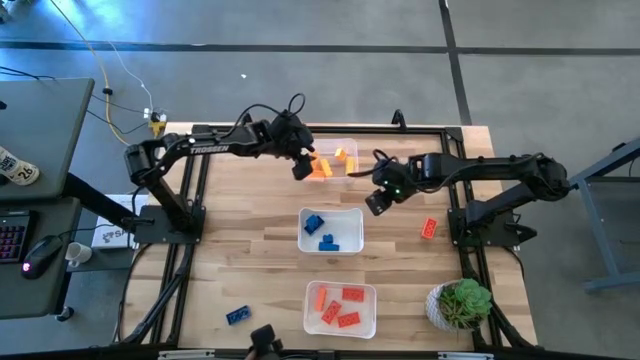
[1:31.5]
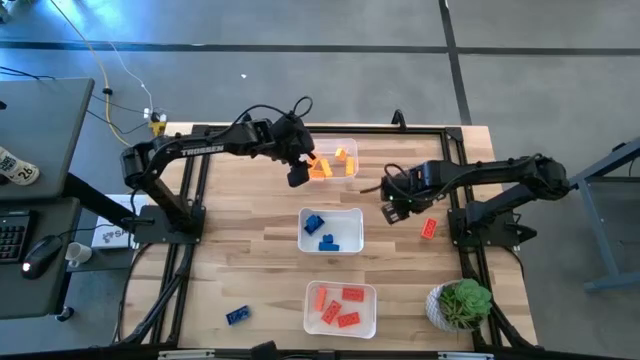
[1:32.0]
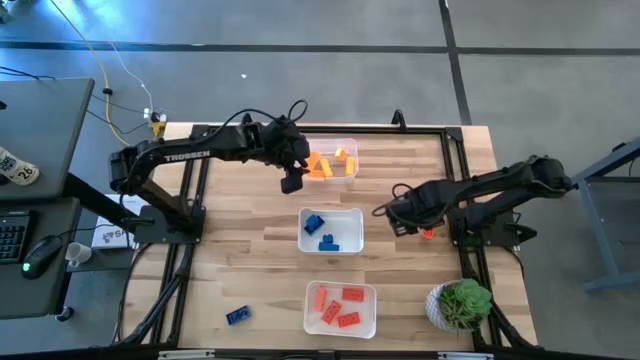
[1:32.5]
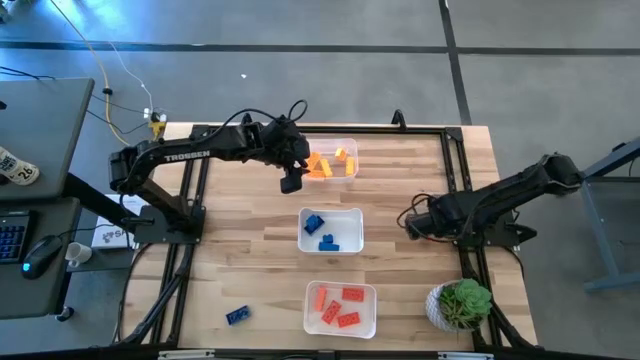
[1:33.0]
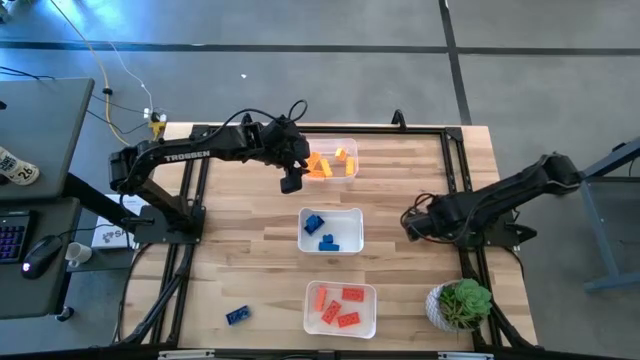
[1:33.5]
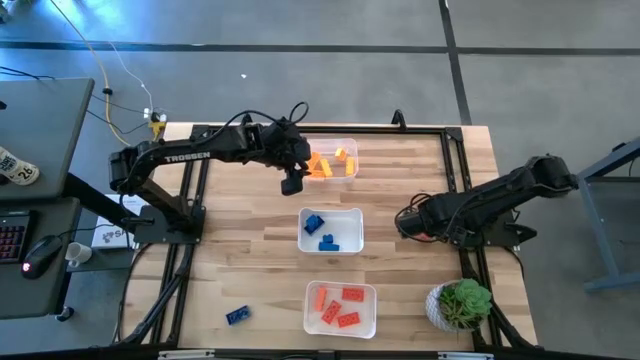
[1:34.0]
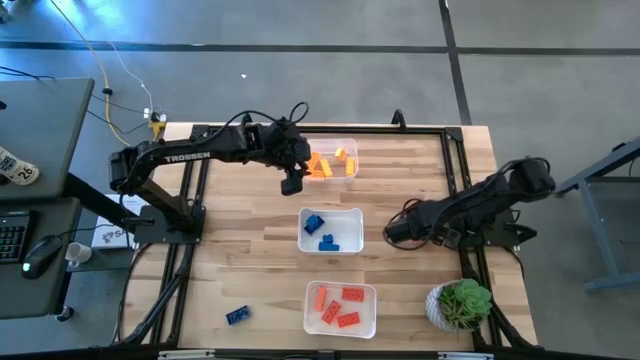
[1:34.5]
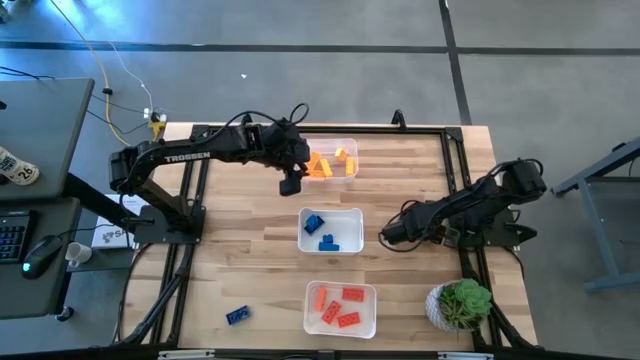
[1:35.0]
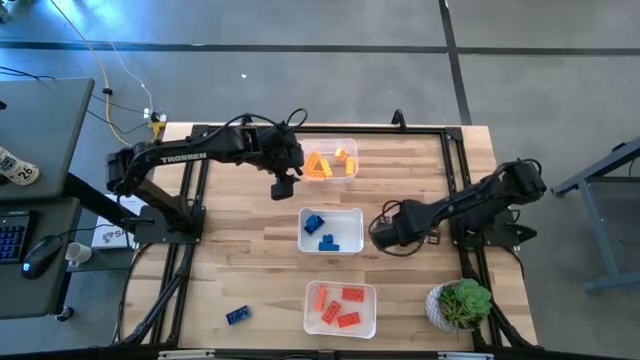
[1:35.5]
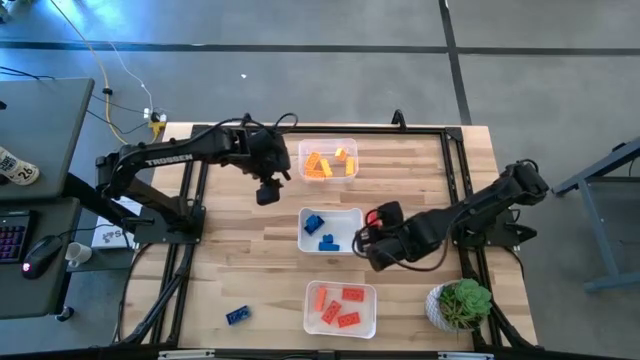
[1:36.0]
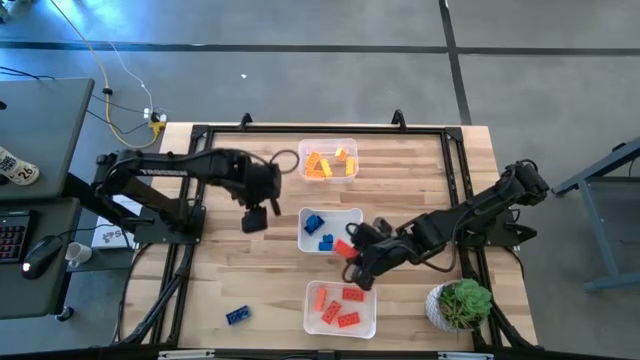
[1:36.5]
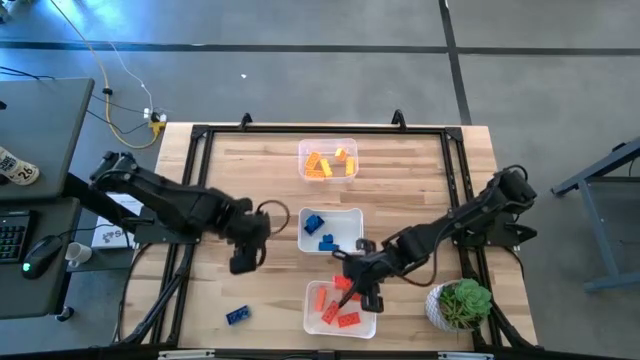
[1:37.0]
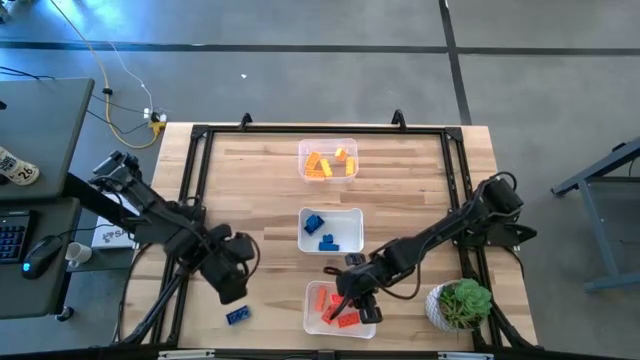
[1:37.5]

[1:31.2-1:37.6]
Task: Sort & place blocks by color
Put the orange game piece into the bottom white bin

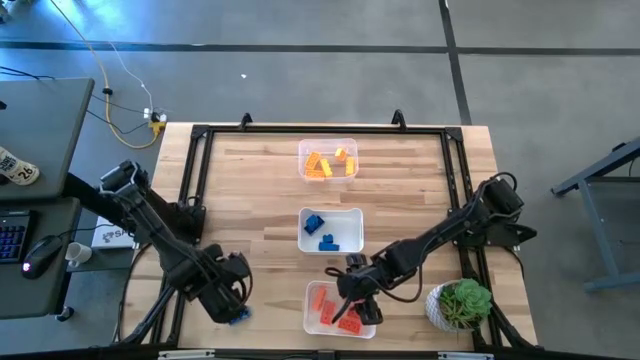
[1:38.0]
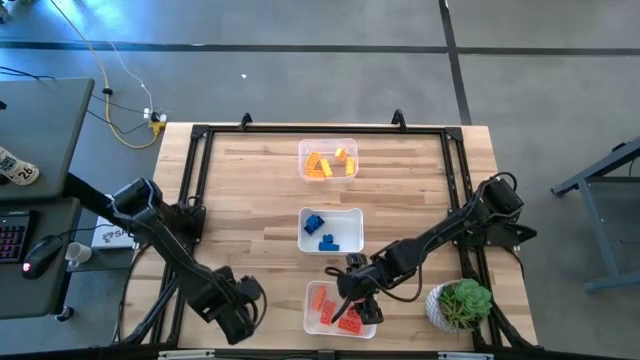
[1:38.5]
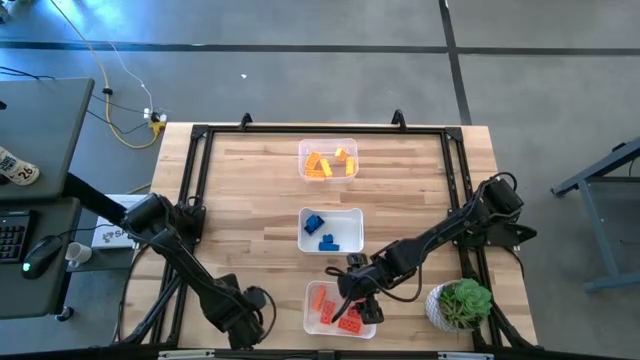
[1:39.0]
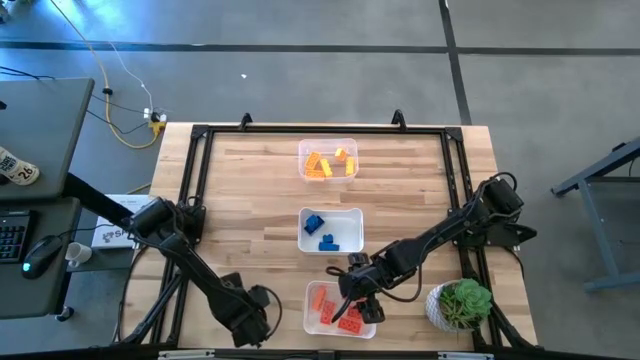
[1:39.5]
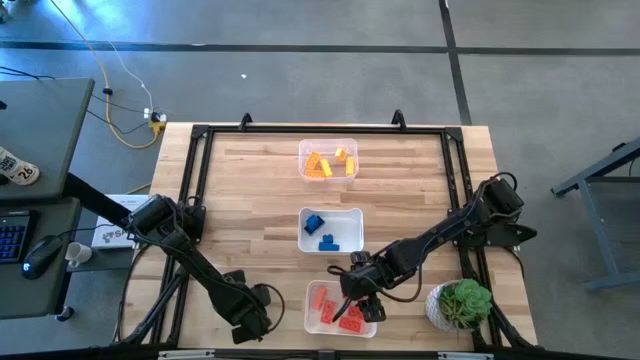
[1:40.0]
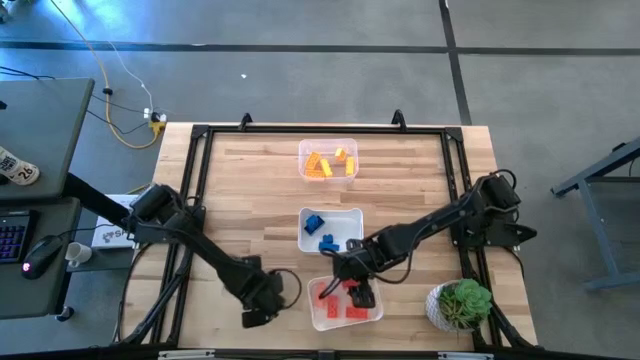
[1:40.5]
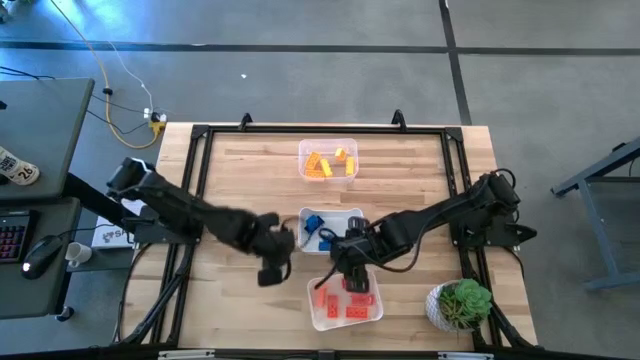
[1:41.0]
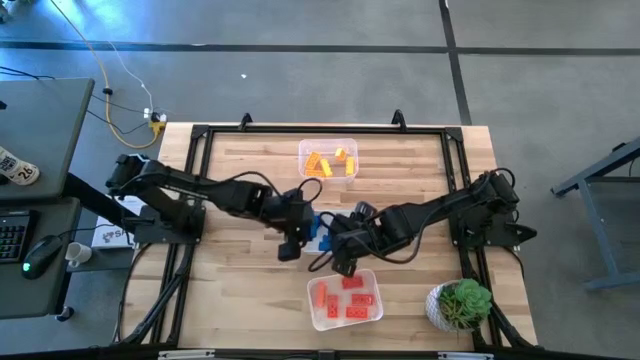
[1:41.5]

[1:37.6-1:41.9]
Put the blue game piece into the top white bin

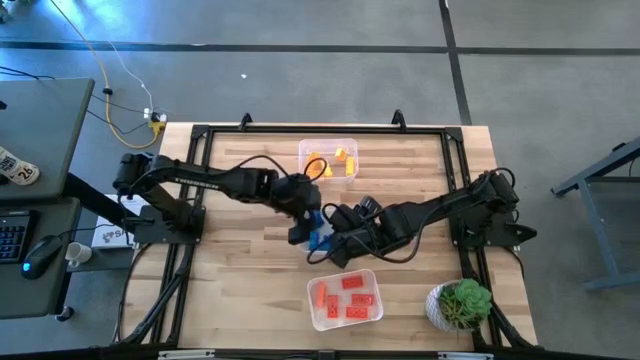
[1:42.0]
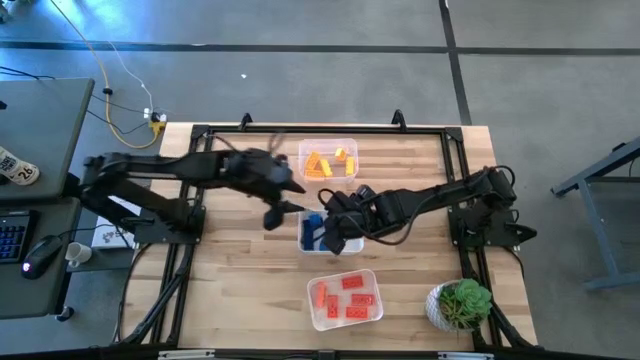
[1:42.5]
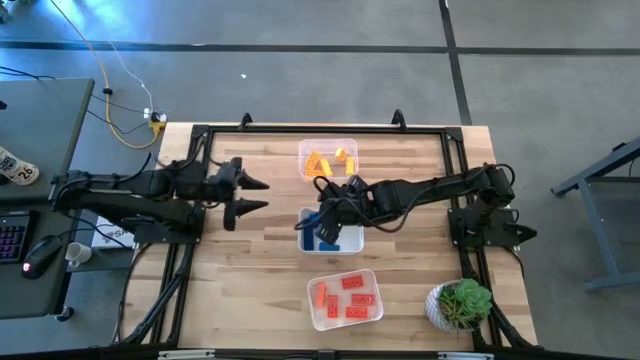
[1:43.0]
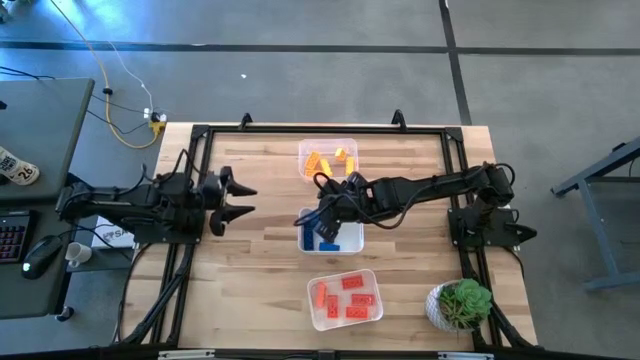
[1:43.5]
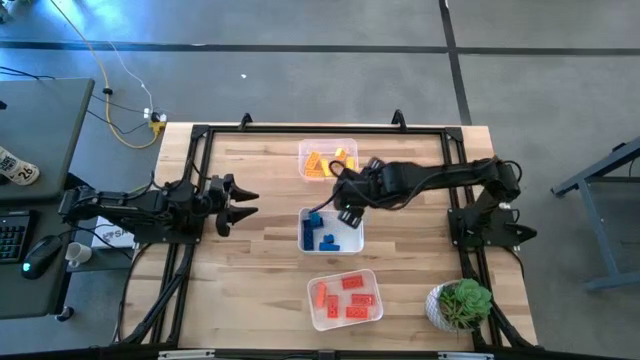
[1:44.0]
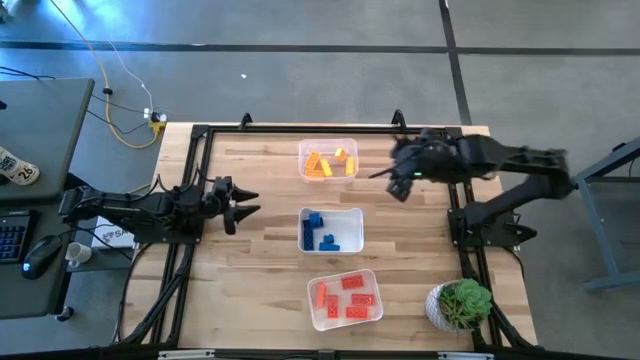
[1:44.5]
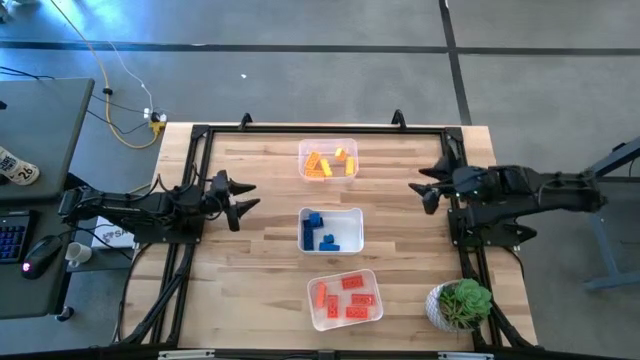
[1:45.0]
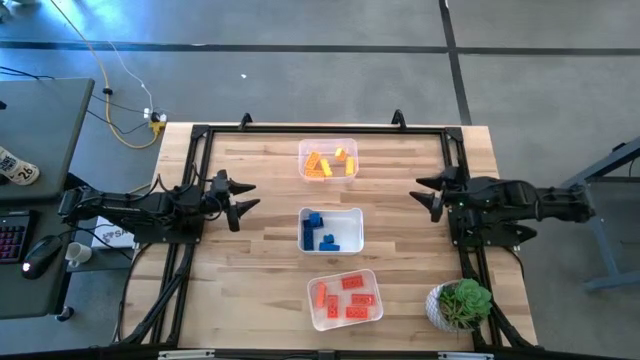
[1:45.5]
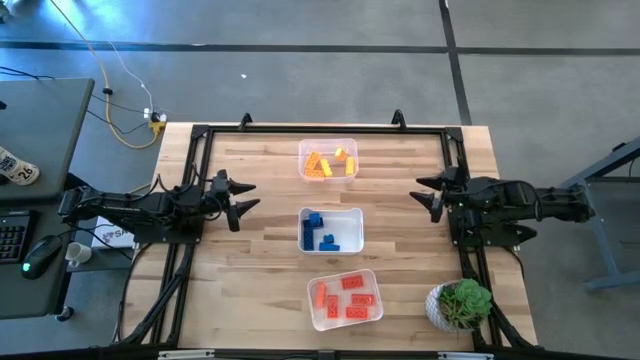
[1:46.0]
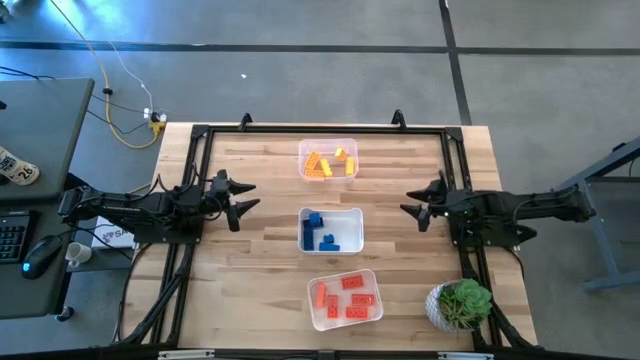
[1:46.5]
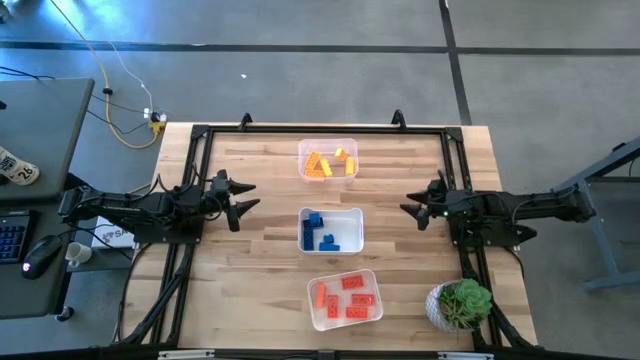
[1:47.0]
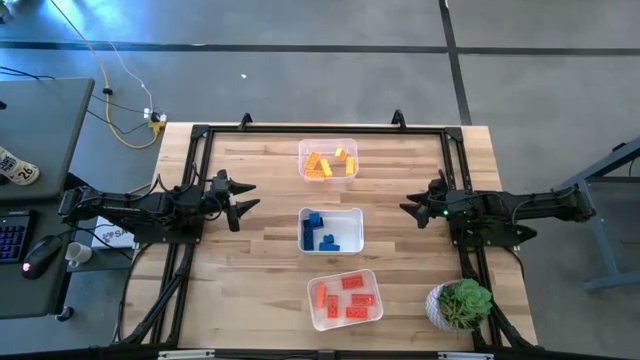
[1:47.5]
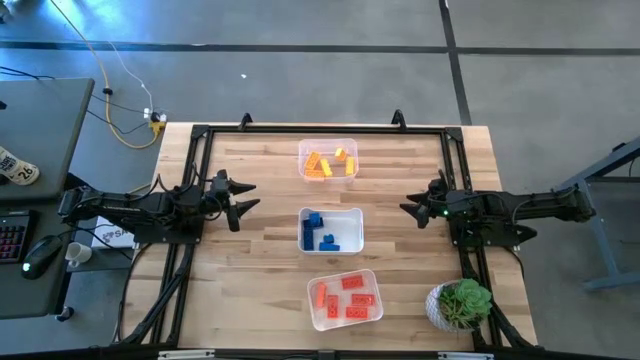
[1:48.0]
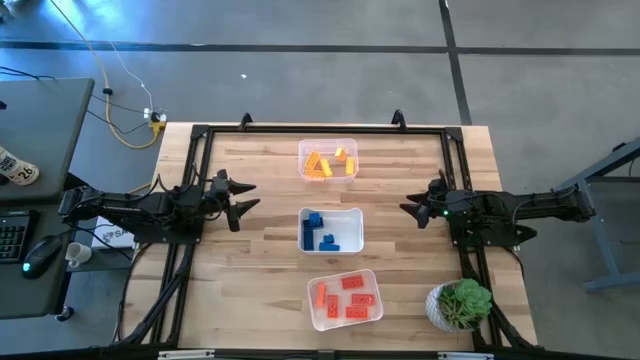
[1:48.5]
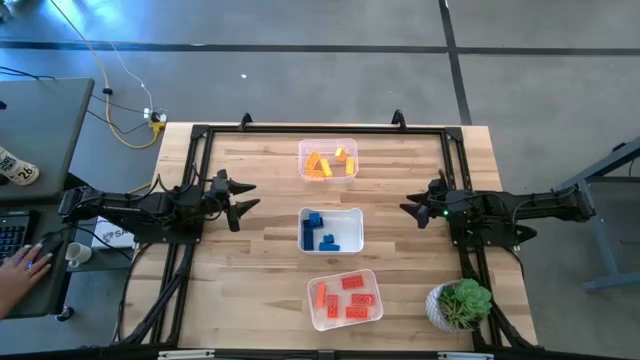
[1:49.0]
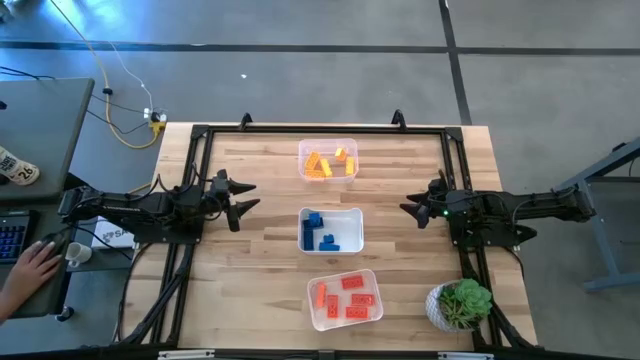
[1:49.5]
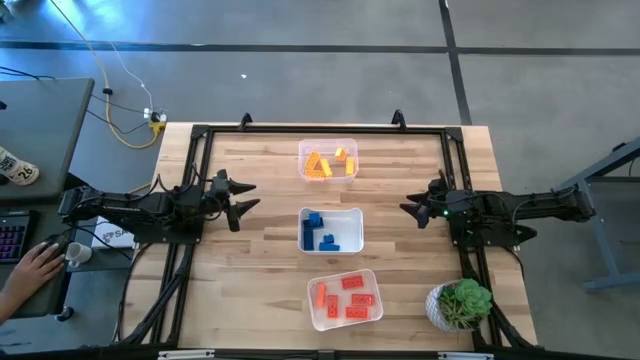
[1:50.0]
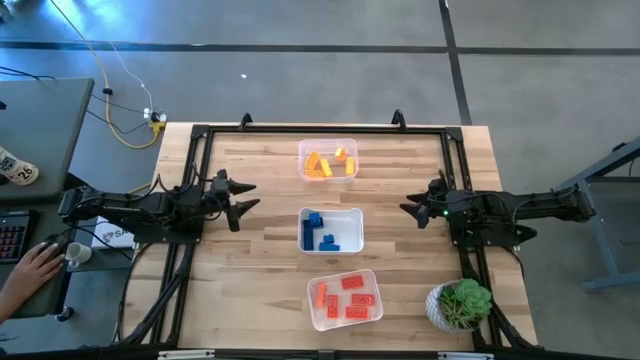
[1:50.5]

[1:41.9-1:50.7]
Return to Home Position

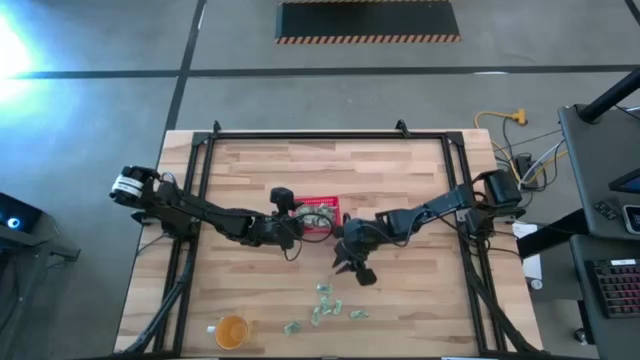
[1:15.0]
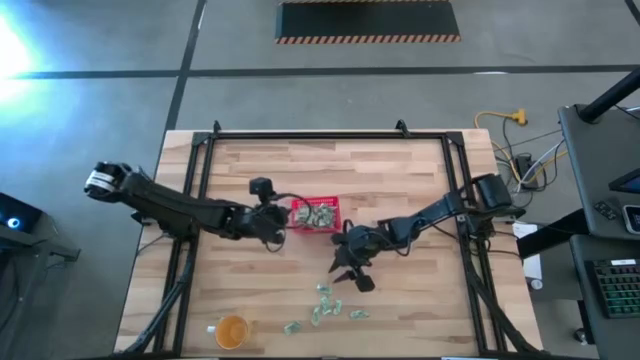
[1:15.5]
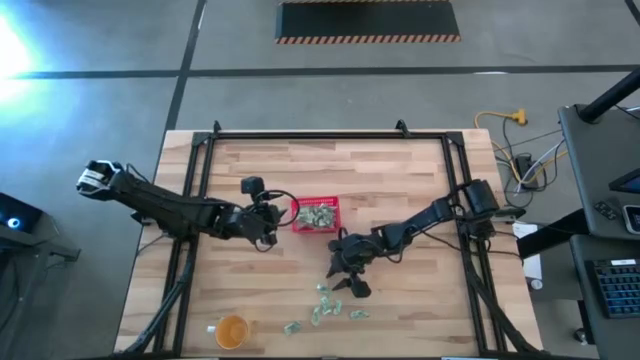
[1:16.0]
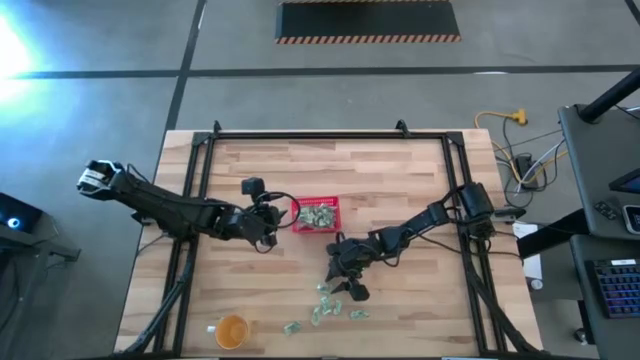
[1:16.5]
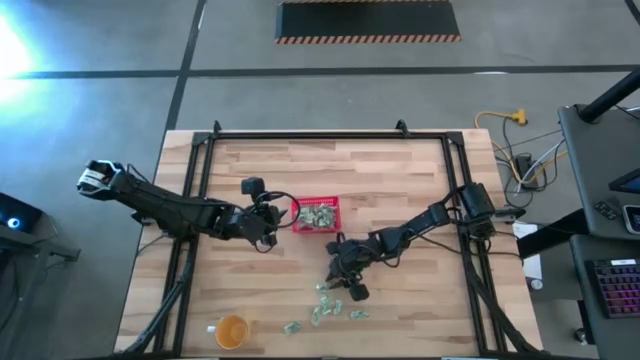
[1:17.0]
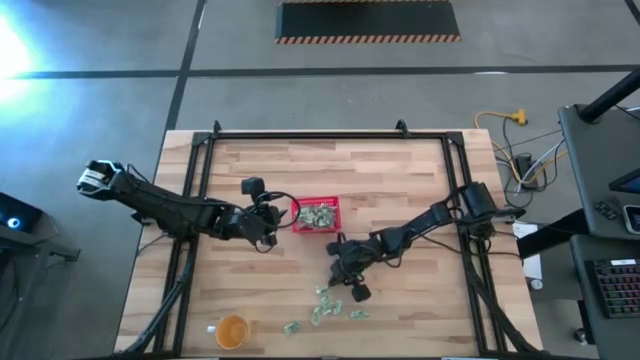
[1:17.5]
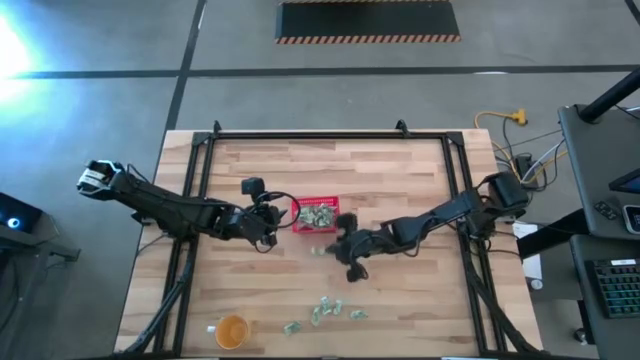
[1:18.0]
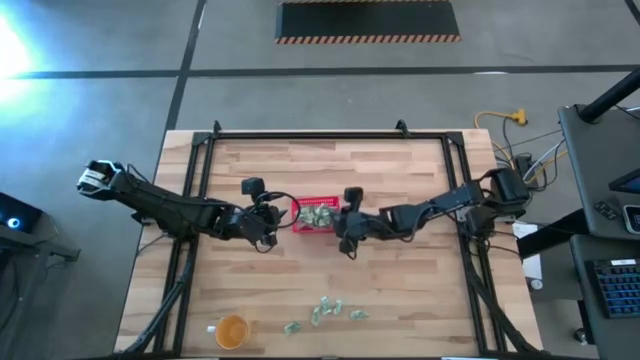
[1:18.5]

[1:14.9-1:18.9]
Task: Pick and place items into bin
Put the stevia packet into the red bin
